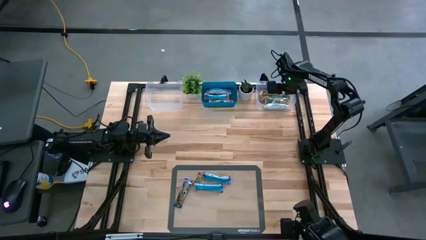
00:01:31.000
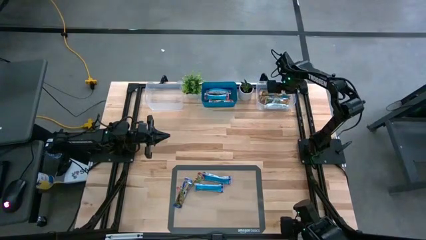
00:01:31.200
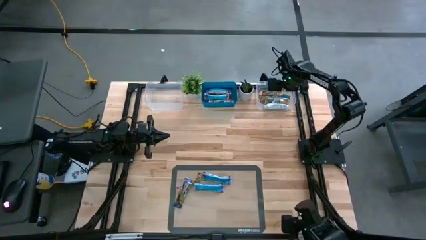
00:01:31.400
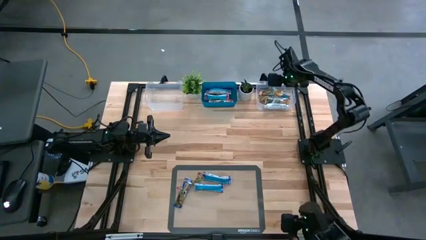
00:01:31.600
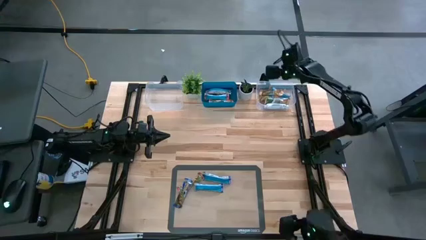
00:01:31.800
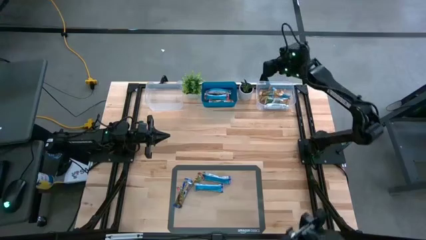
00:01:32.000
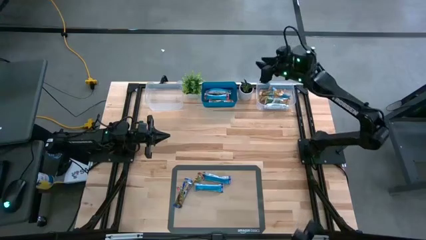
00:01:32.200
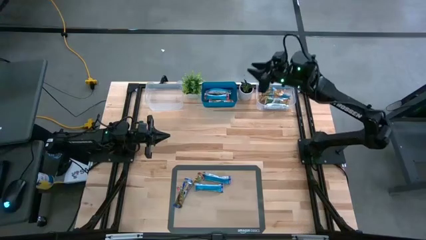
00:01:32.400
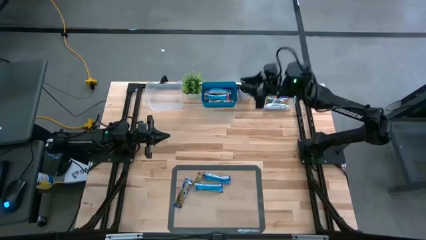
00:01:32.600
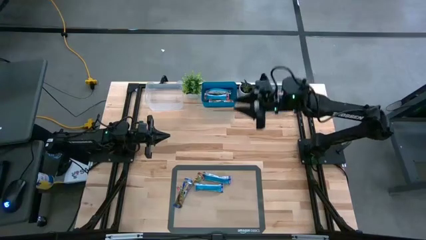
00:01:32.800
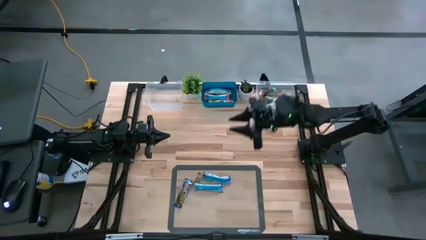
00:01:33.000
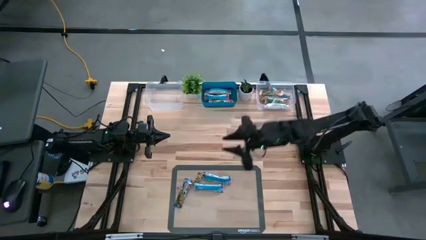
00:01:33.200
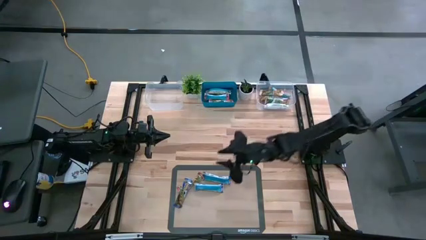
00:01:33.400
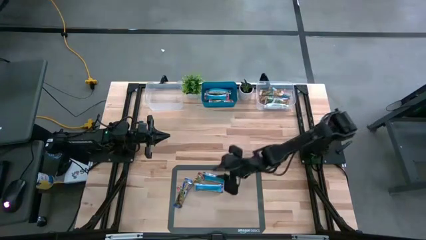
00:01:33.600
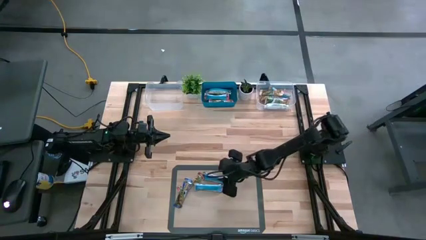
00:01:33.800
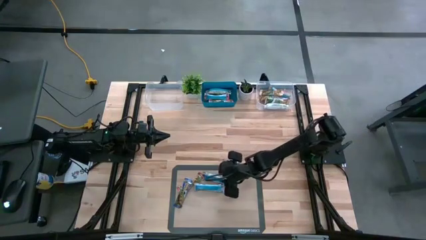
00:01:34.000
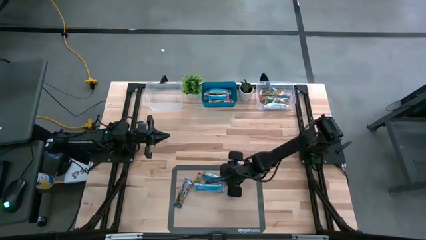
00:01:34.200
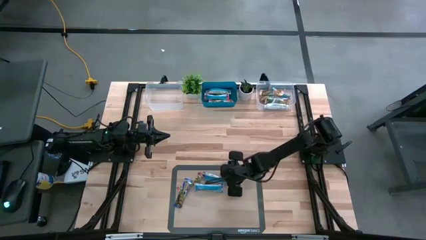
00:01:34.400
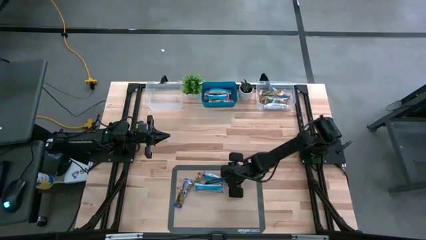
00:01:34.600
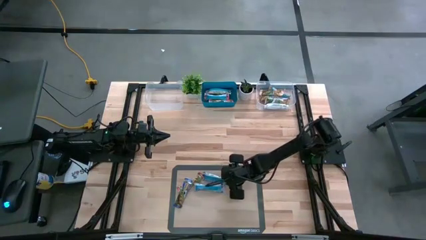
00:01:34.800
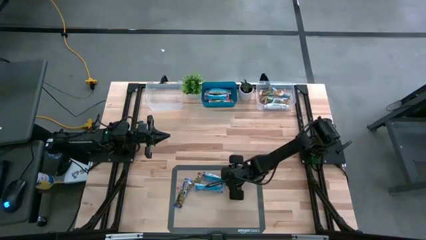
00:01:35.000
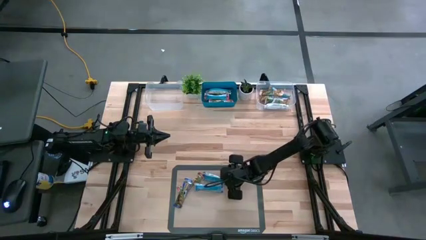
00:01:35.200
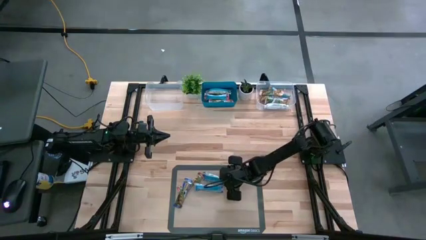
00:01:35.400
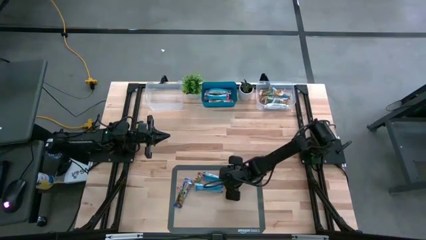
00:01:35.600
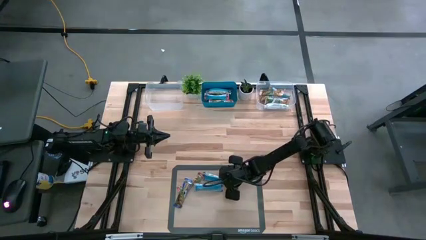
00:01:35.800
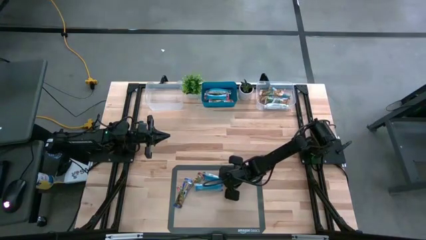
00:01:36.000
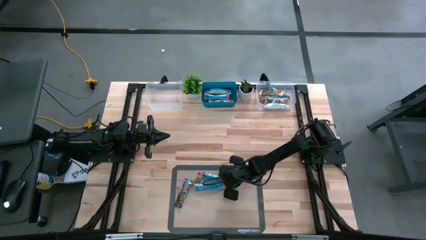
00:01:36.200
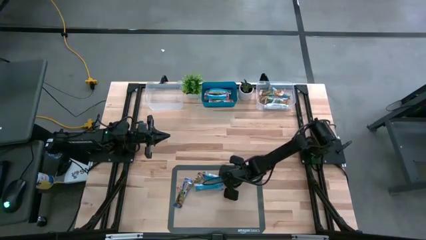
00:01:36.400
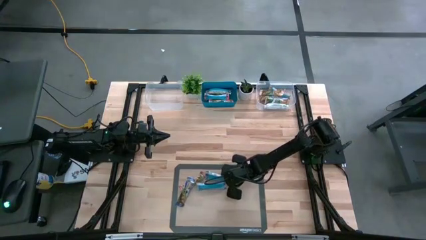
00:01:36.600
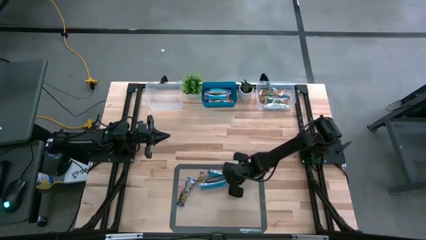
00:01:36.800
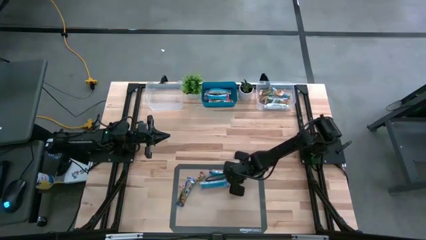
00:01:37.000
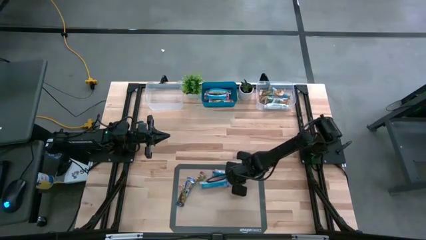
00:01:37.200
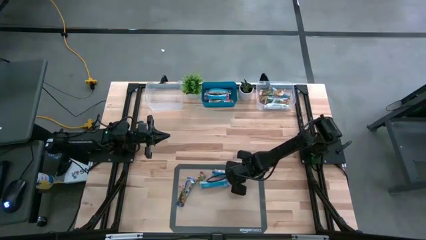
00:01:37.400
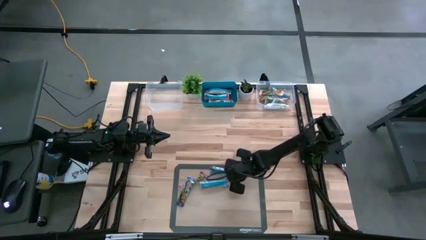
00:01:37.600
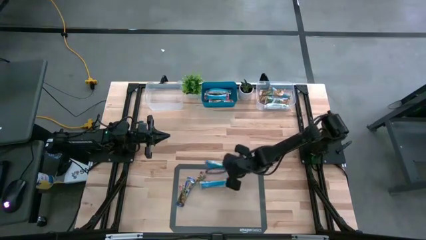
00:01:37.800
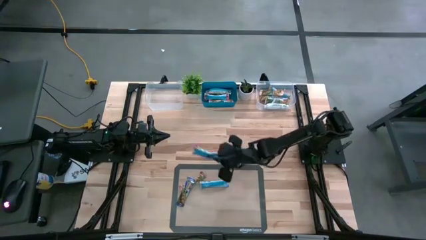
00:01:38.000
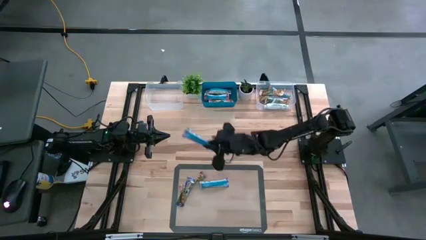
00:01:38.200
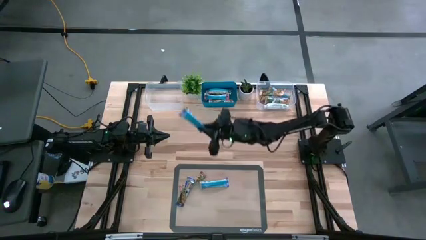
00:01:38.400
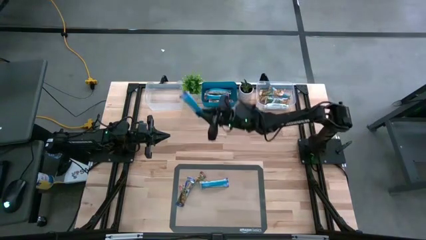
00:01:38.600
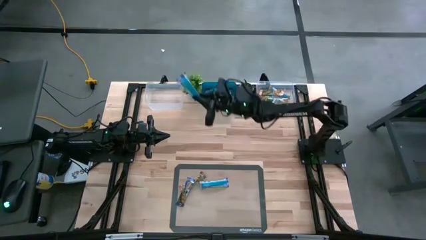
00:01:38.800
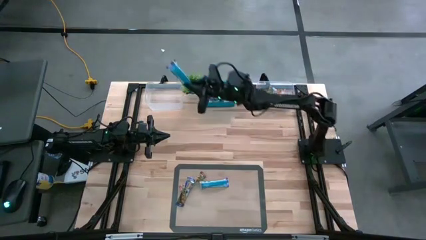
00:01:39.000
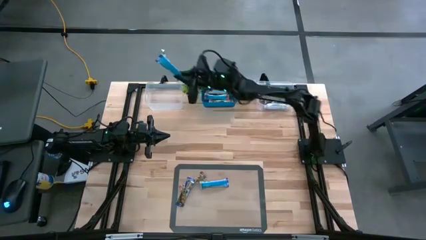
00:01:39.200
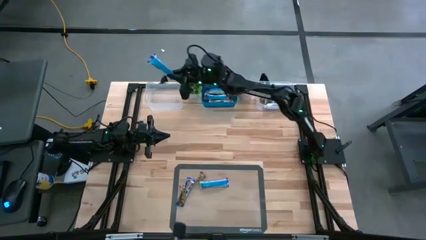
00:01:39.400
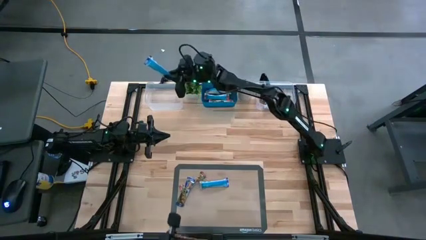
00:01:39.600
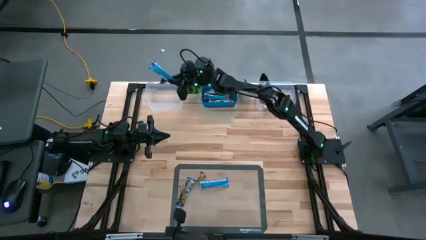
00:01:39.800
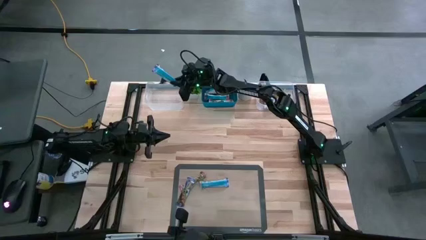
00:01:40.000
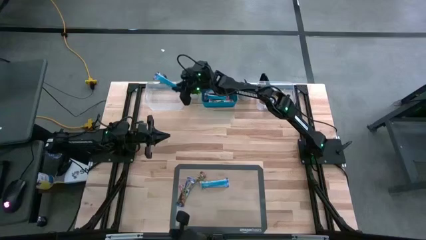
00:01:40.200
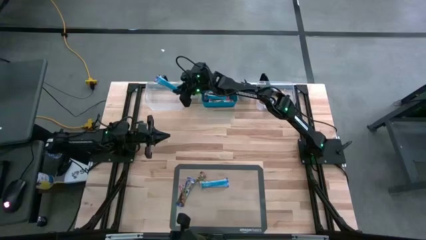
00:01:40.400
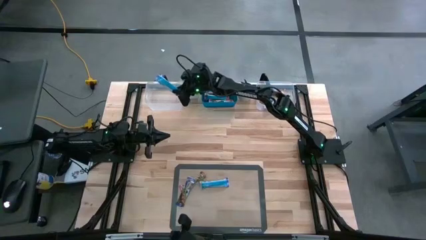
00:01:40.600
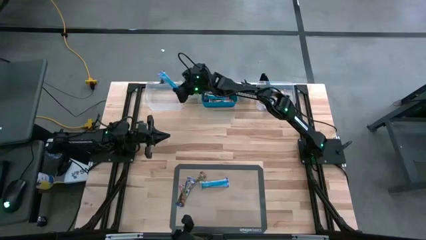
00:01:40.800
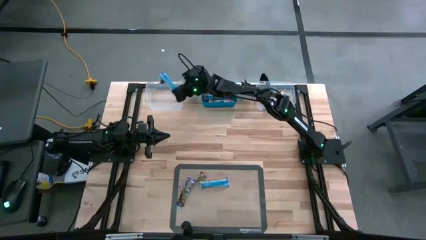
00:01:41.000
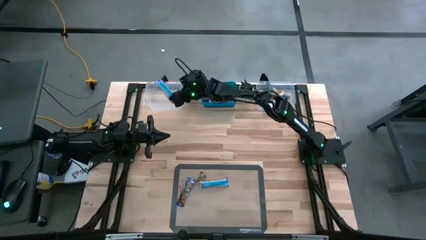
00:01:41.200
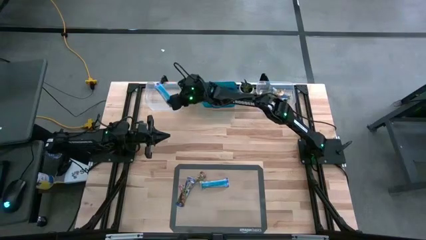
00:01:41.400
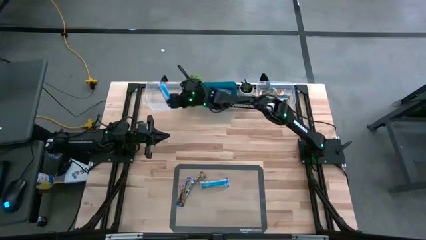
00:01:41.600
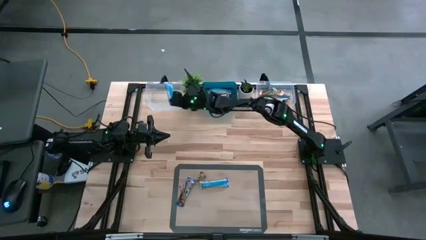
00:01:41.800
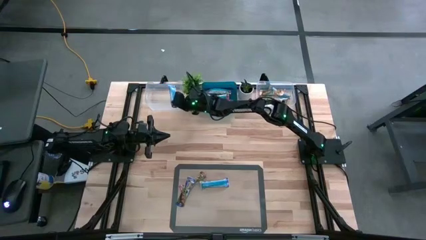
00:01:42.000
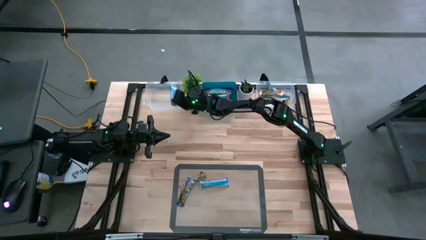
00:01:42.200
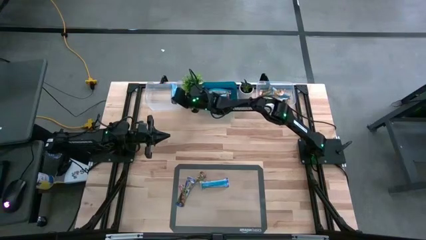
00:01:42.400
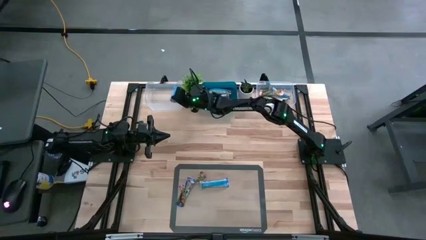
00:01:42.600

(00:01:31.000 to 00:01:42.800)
Task: Pick and place Granola Bars by type
Put the blue granola bar into the left transparent bin

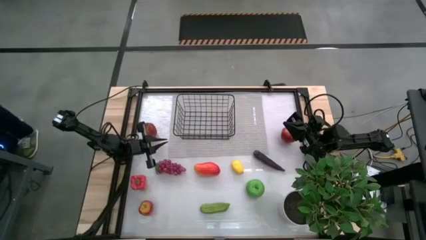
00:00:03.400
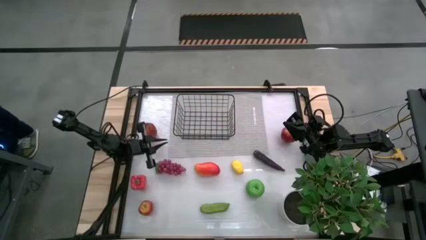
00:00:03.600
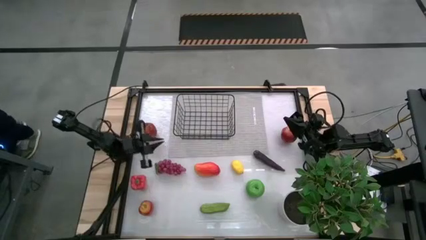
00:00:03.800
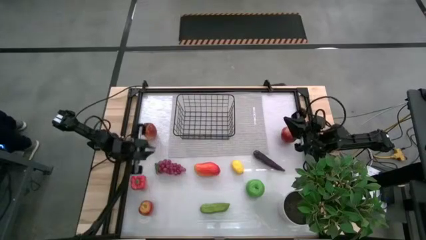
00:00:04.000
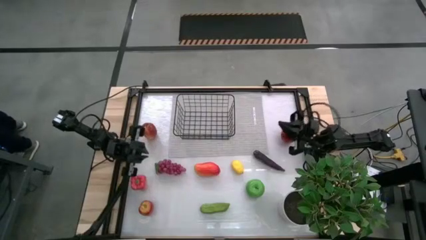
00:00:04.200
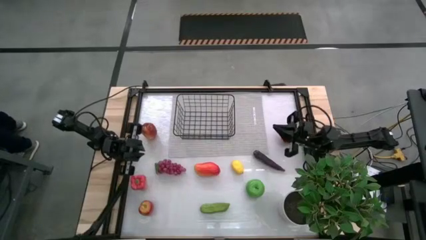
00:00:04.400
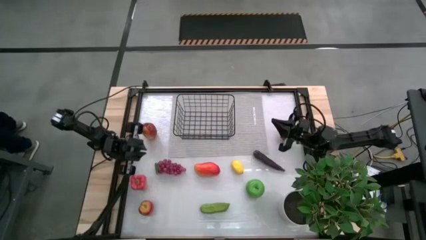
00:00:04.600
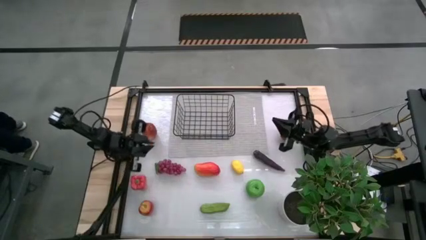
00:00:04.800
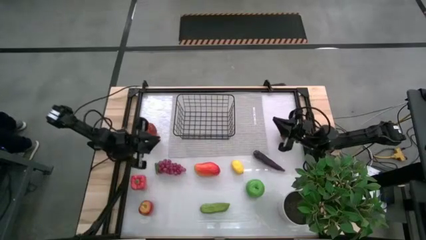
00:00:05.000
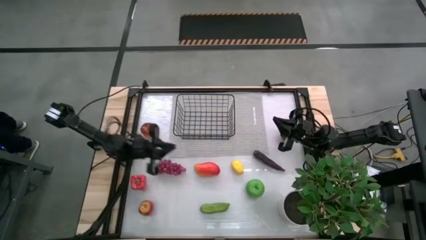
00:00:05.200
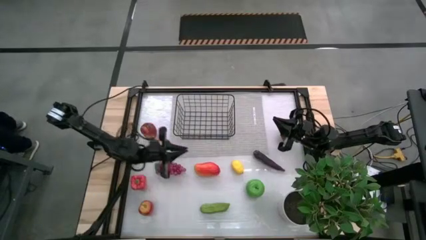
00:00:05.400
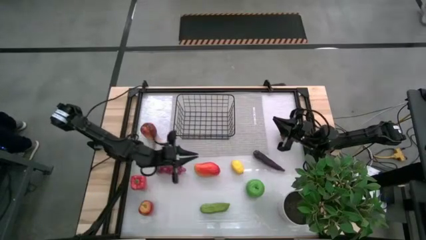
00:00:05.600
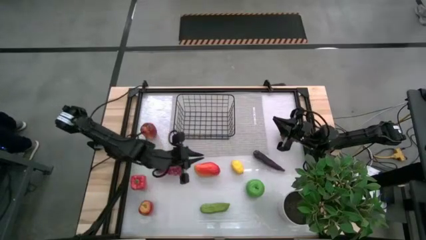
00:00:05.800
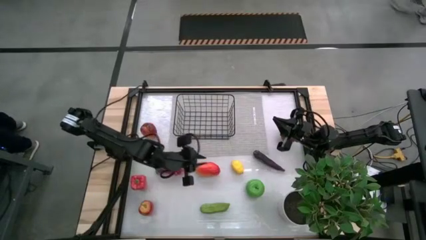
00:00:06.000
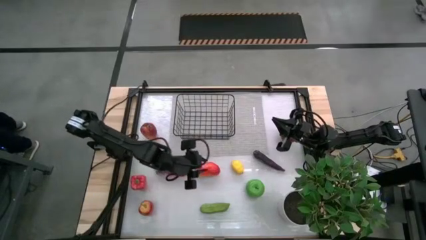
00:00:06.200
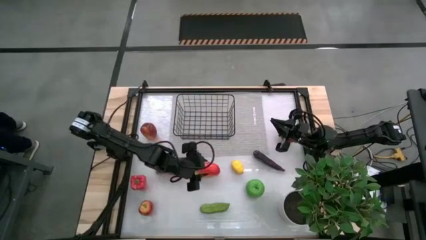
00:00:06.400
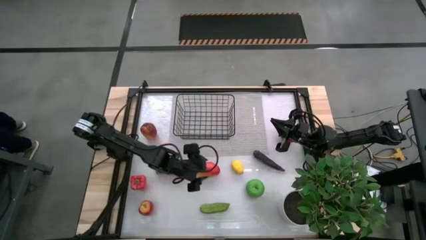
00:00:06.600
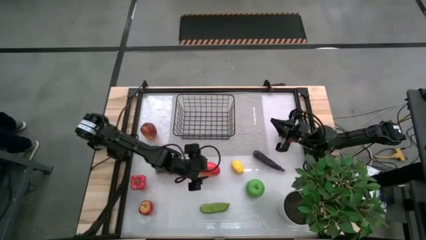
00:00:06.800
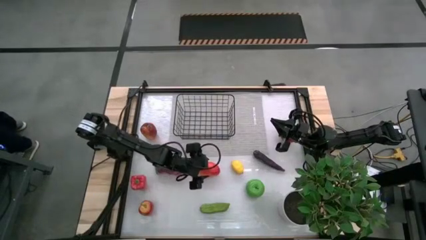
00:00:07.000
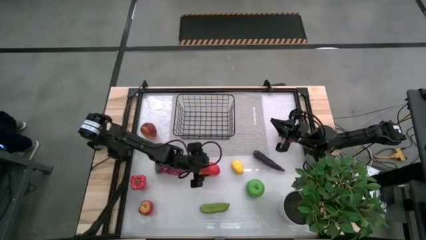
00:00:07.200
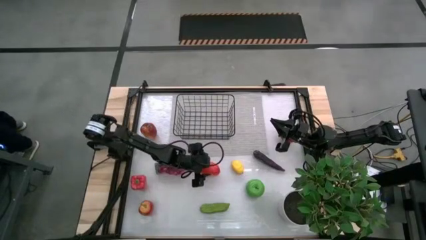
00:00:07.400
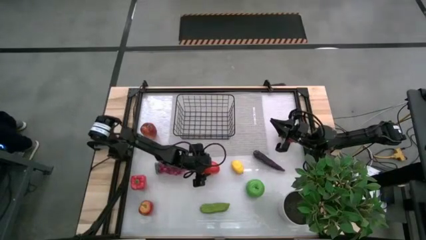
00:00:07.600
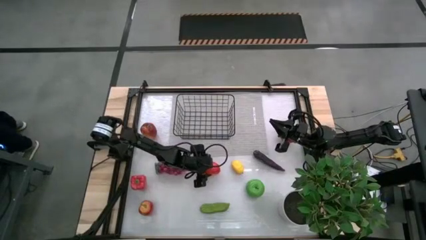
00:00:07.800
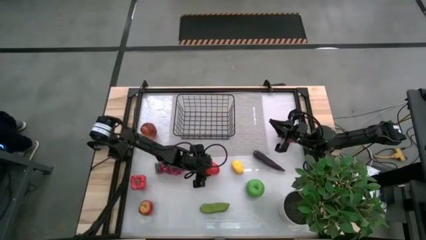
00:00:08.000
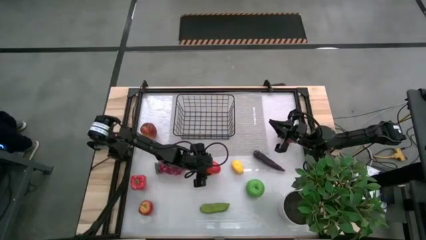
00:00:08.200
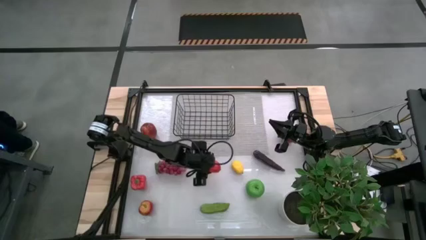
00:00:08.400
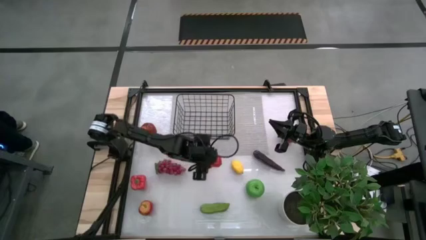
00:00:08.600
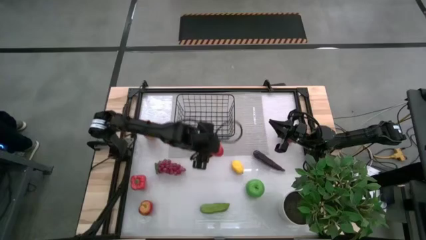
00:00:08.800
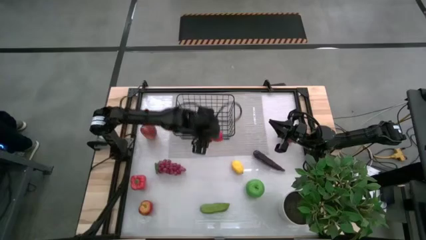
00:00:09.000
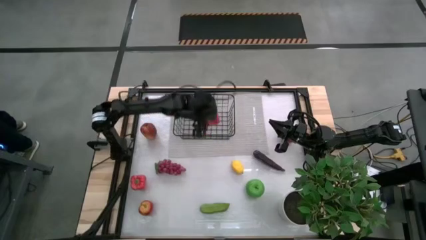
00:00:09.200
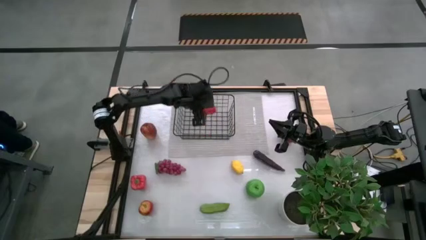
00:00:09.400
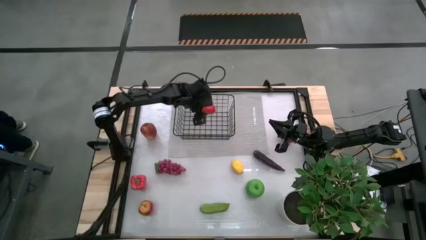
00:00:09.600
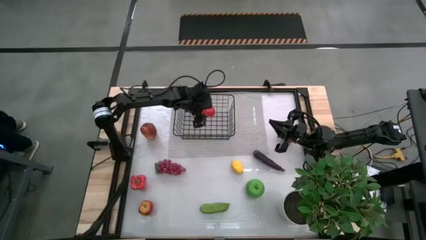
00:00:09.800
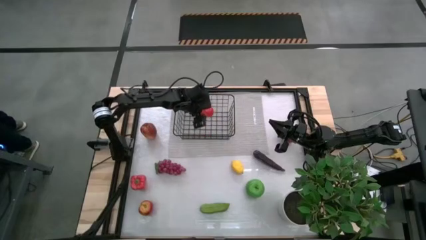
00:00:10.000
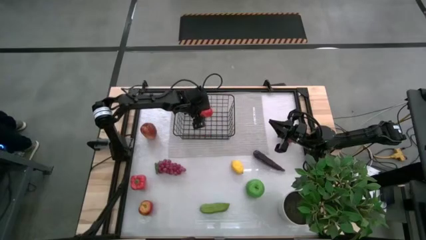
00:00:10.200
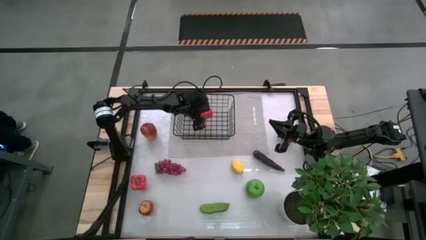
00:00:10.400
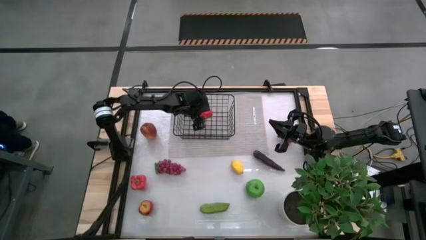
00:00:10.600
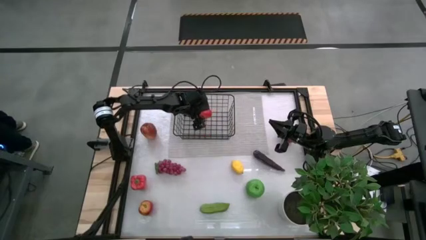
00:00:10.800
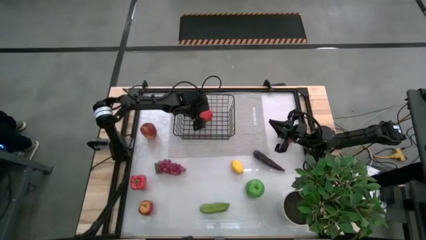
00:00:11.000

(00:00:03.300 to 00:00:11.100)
Task: Build produce basket
Put the mango into the wire basket
